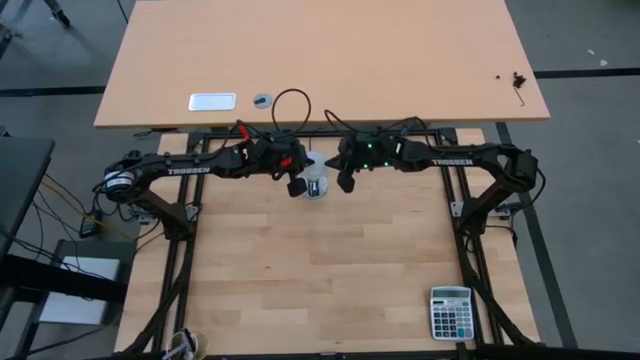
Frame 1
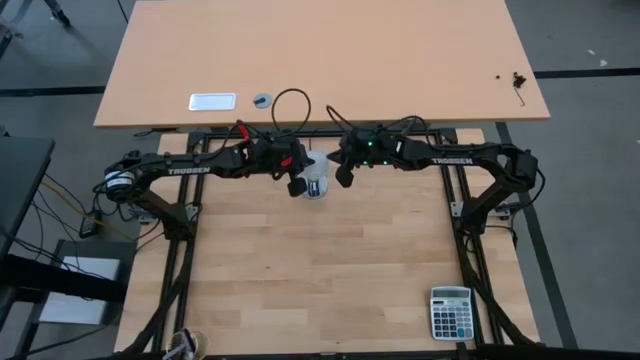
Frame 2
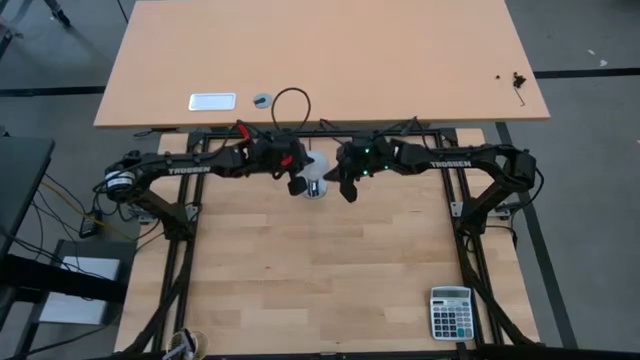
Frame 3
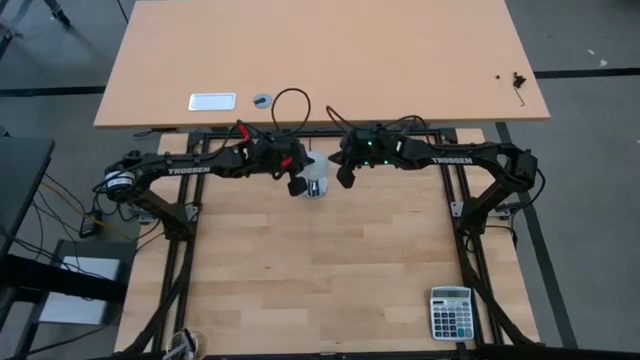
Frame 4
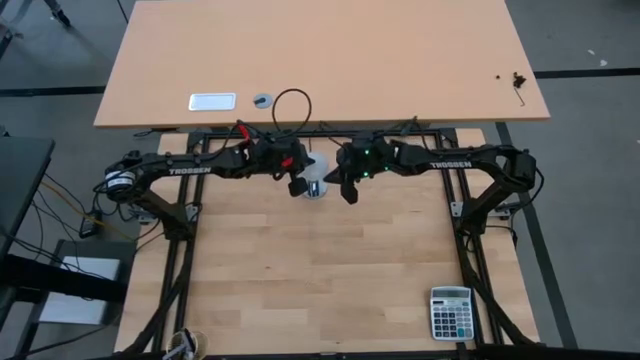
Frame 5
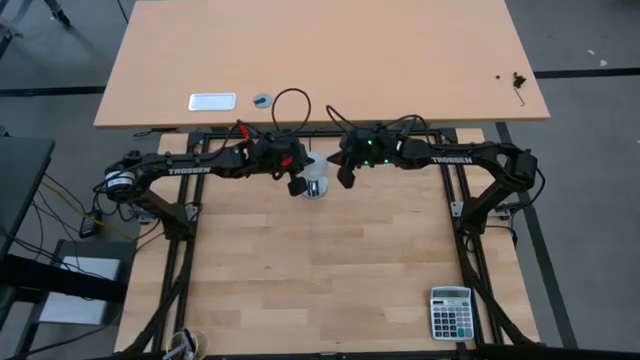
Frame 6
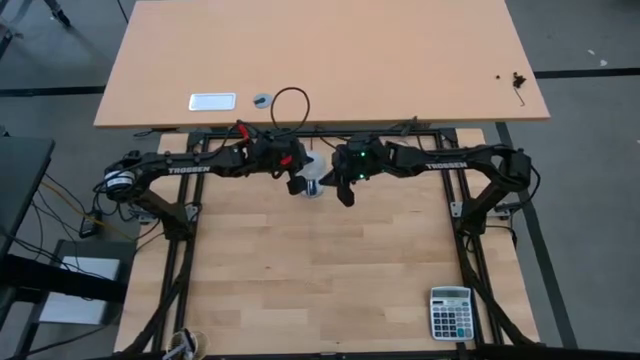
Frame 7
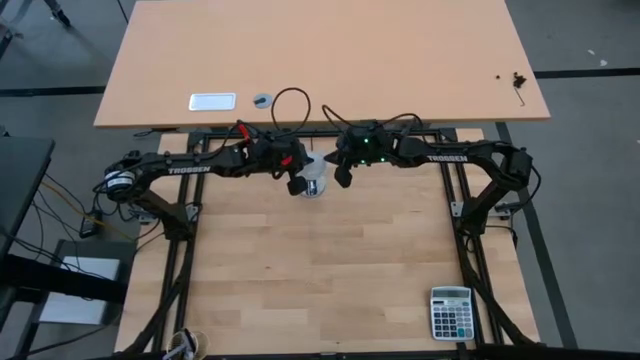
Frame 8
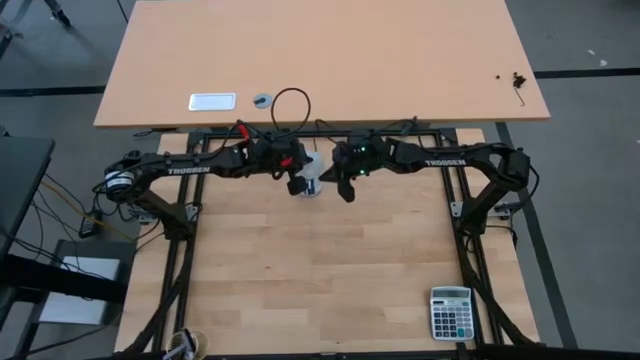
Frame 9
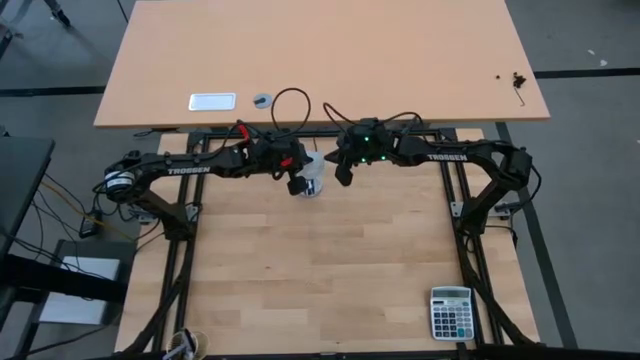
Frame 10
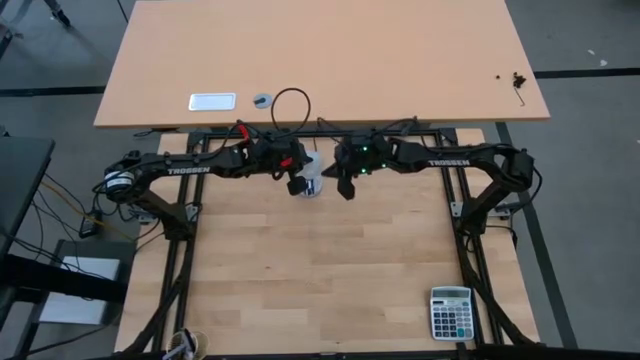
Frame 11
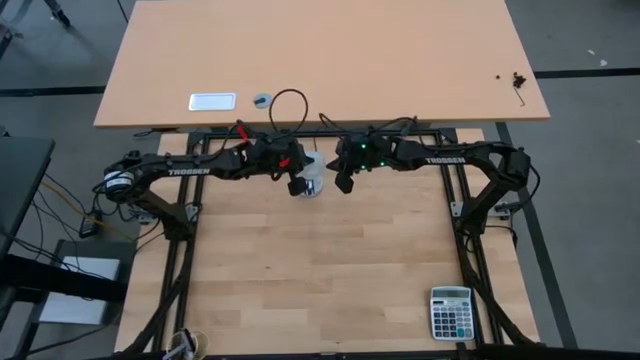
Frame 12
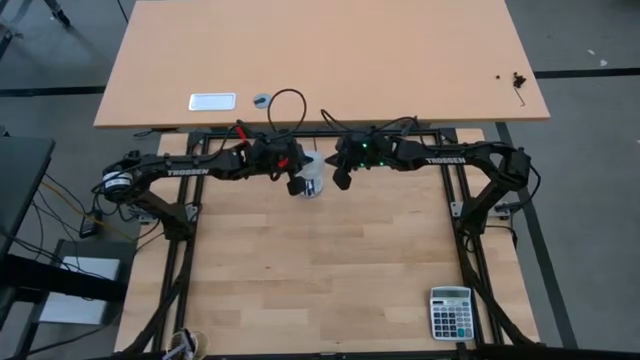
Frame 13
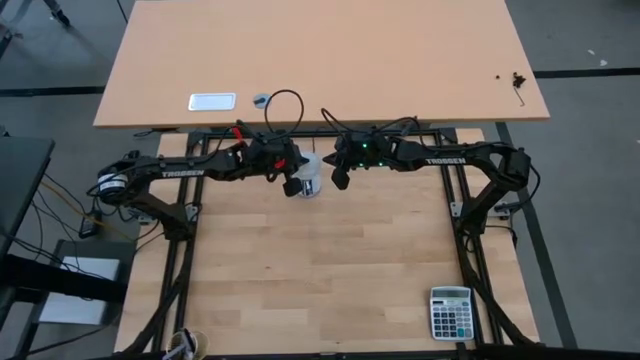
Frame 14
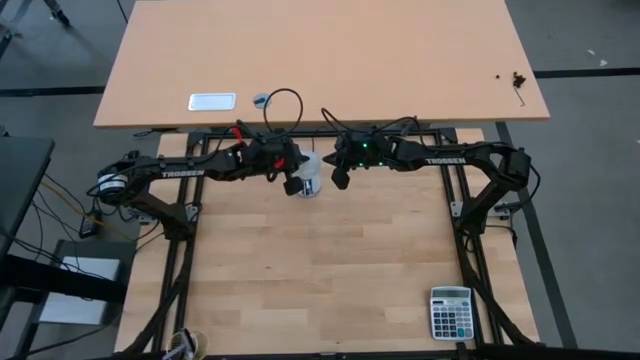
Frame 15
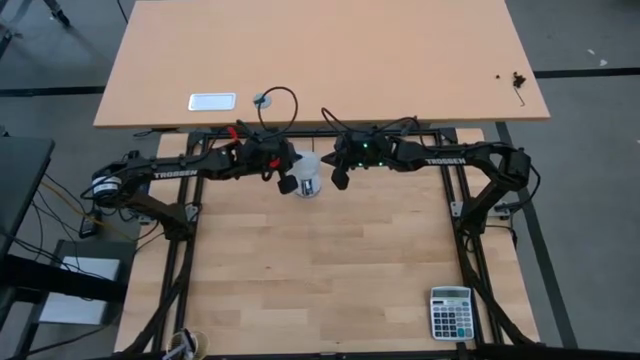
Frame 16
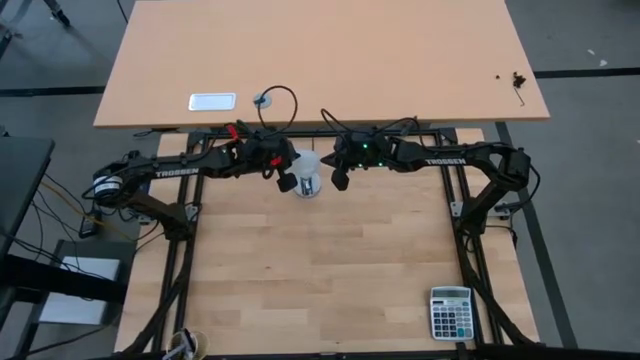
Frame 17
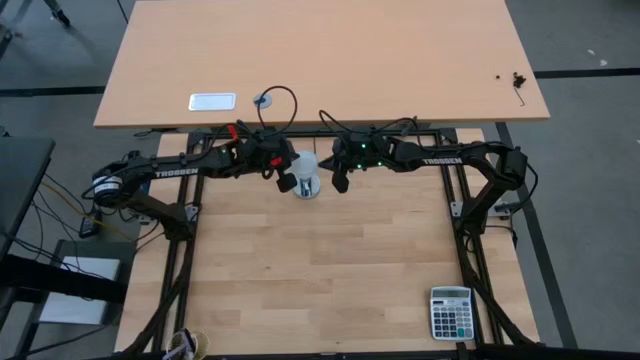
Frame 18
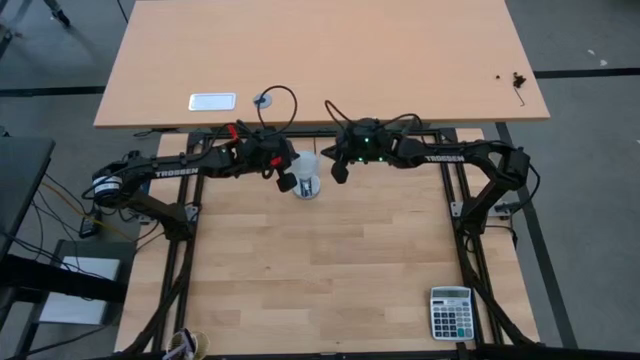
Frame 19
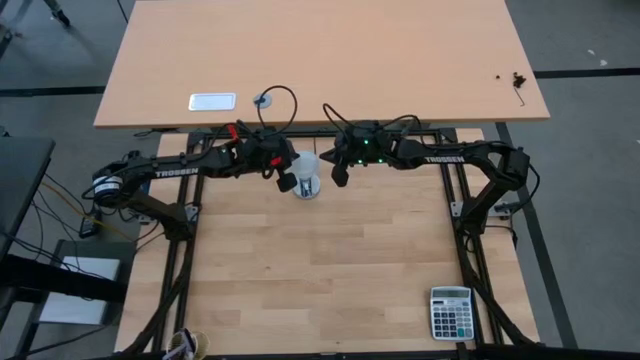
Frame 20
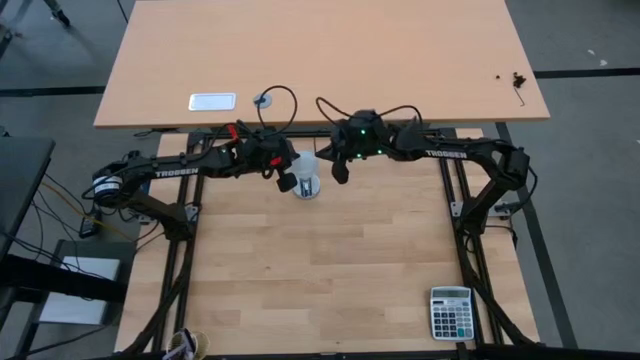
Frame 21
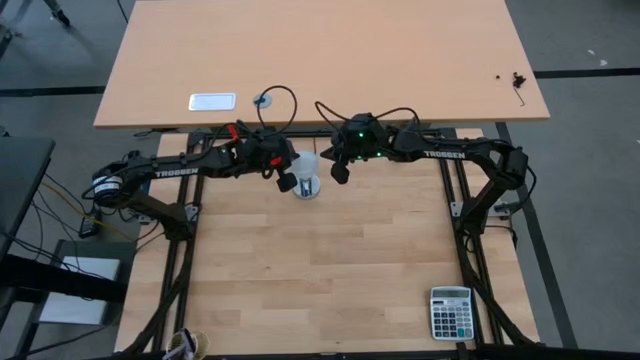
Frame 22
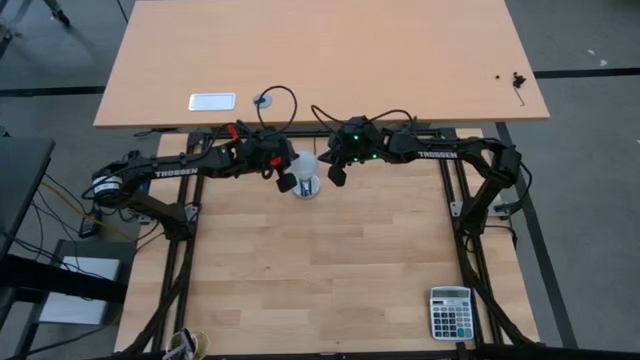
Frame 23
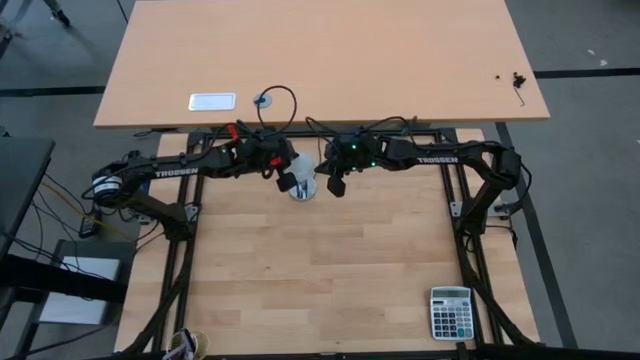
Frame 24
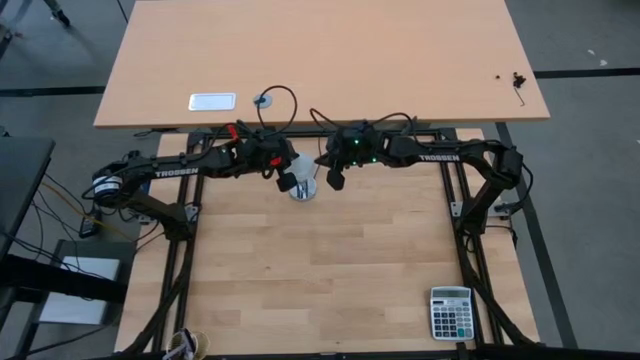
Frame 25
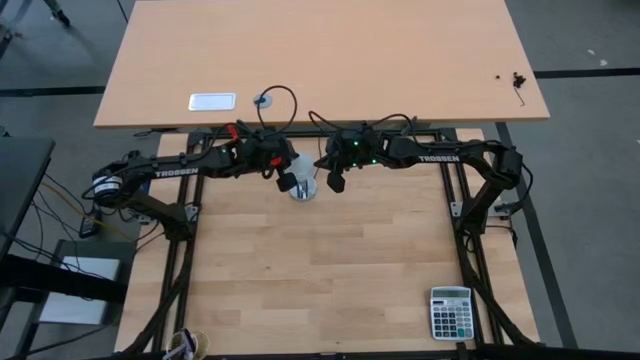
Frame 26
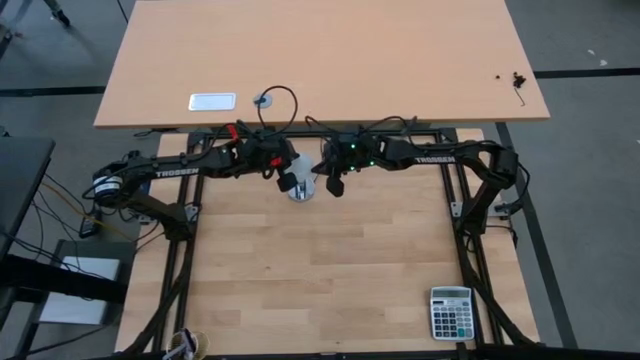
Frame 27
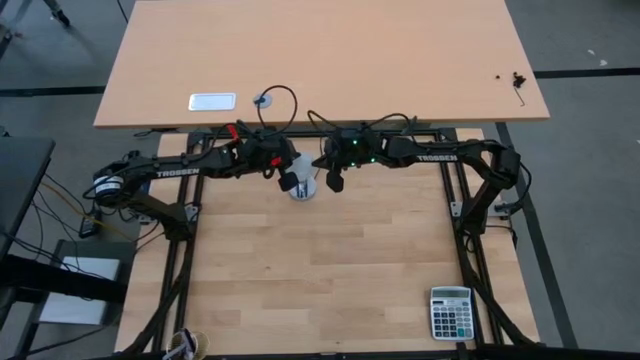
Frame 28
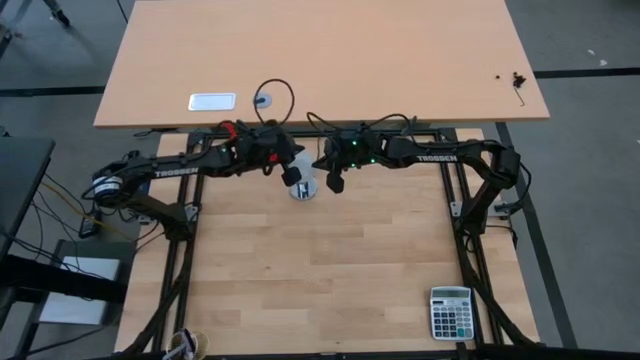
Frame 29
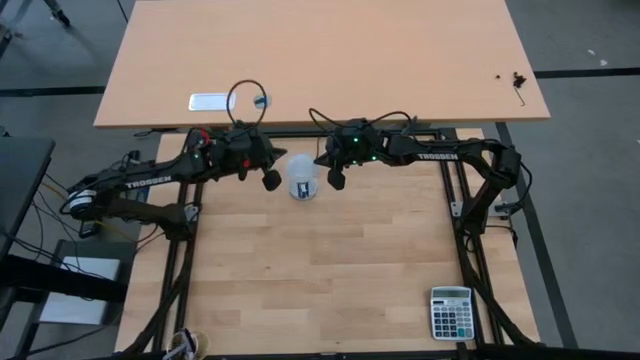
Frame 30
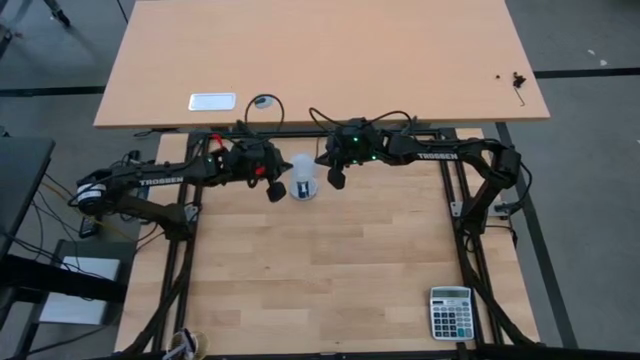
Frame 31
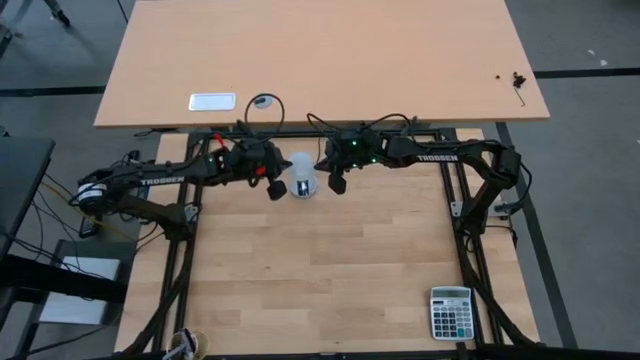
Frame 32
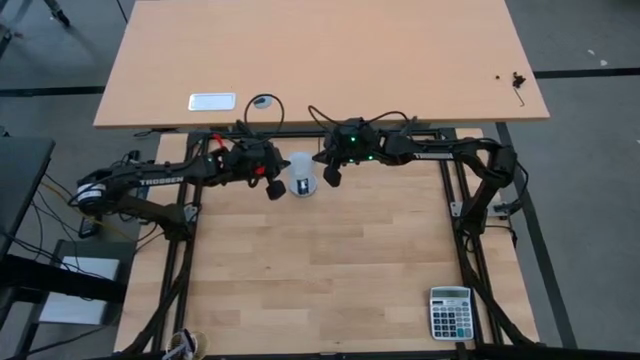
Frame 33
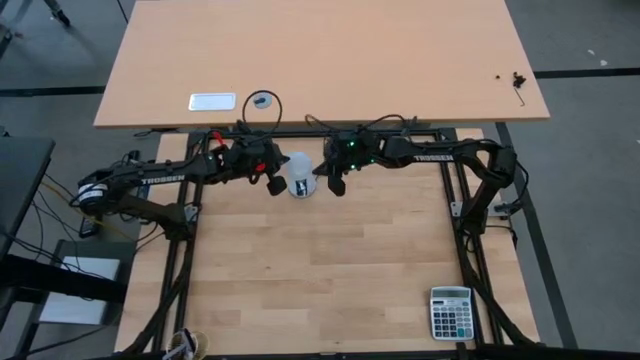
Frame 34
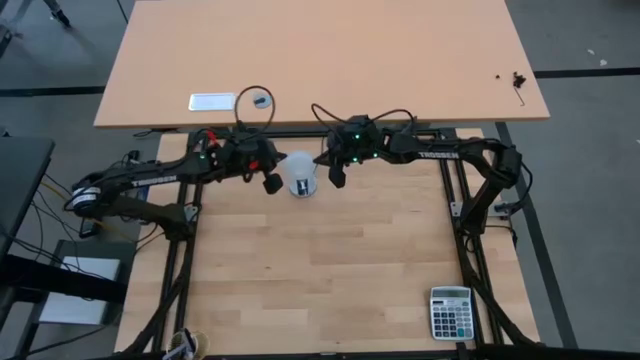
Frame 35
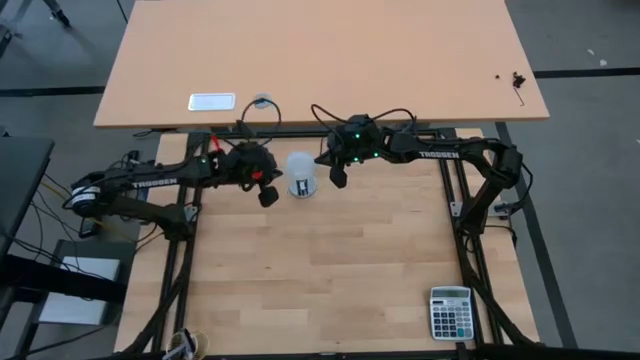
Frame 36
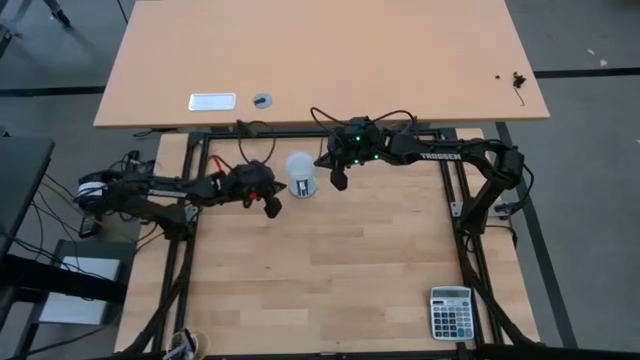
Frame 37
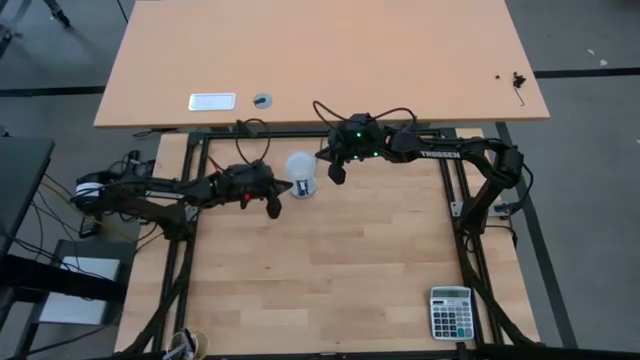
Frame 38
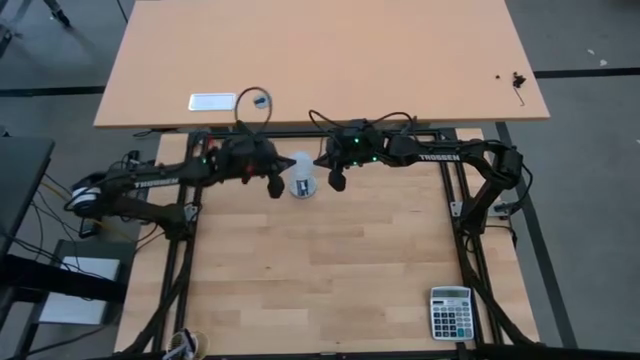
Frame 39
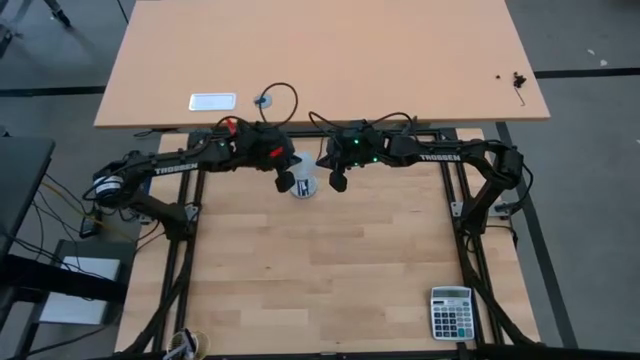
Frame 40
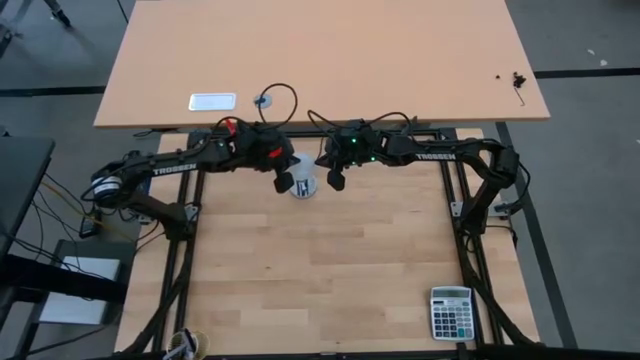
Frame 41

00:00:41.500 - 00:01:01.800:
Task: Screw lightbulb
Insert the light into the lamp socket
